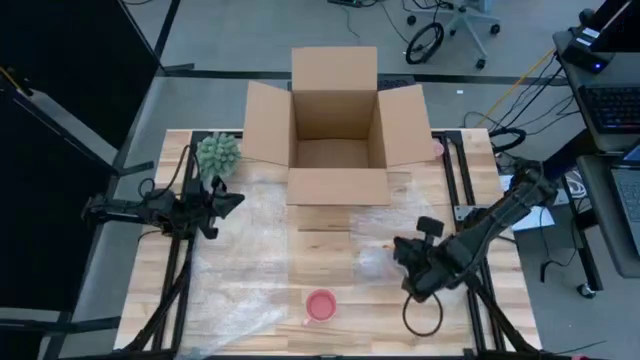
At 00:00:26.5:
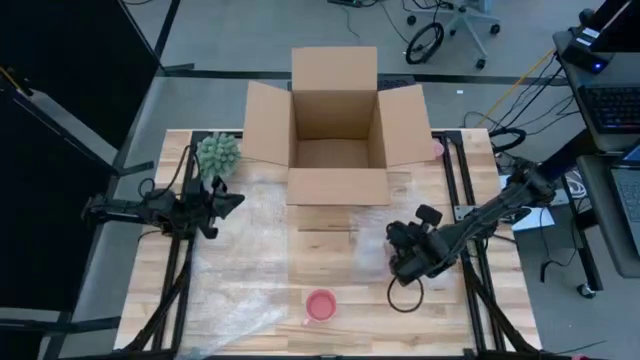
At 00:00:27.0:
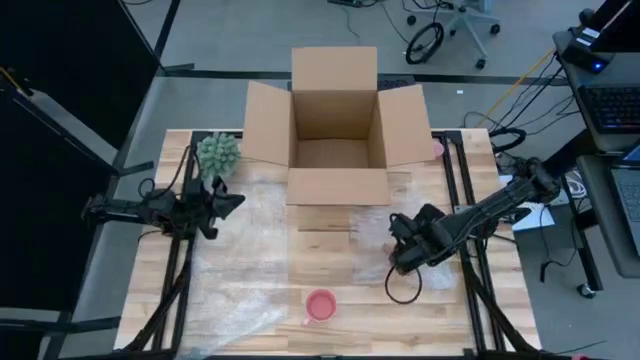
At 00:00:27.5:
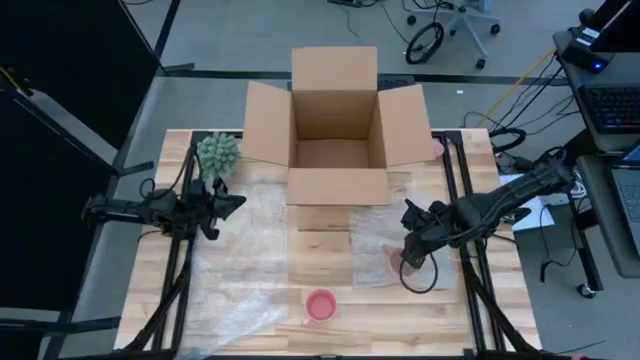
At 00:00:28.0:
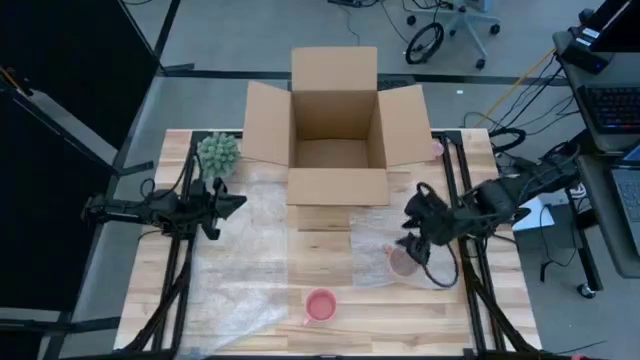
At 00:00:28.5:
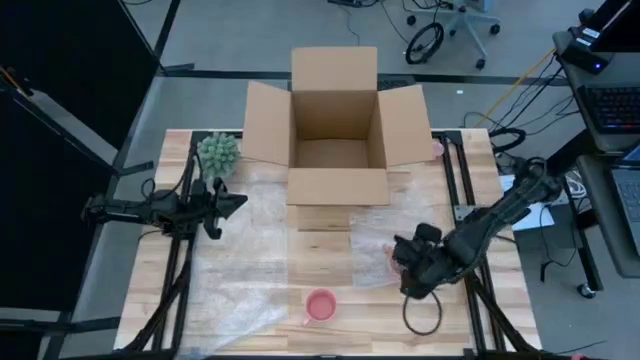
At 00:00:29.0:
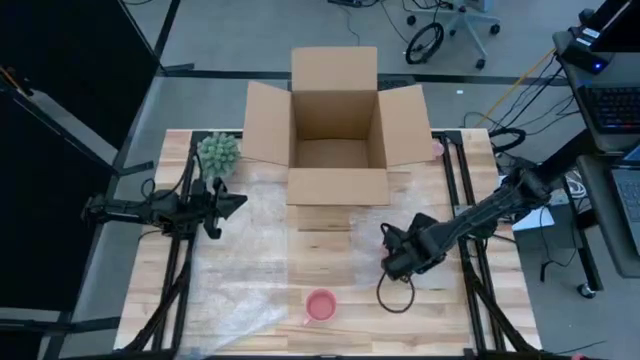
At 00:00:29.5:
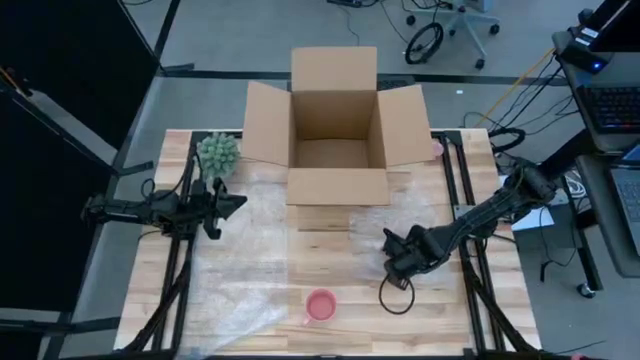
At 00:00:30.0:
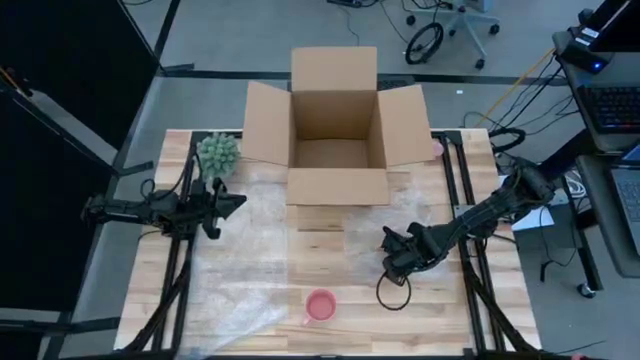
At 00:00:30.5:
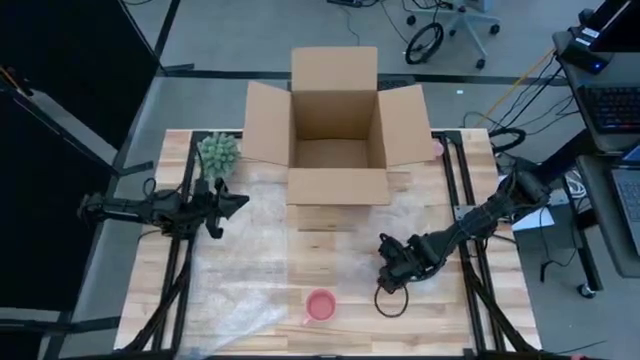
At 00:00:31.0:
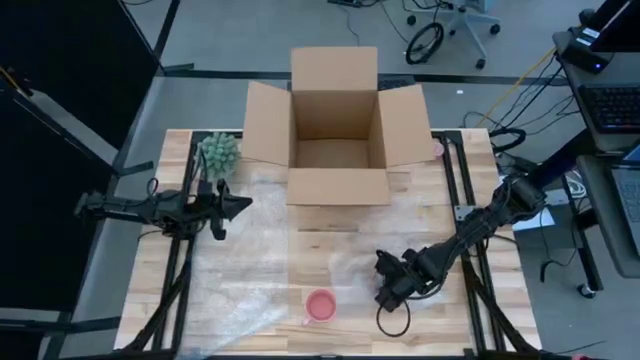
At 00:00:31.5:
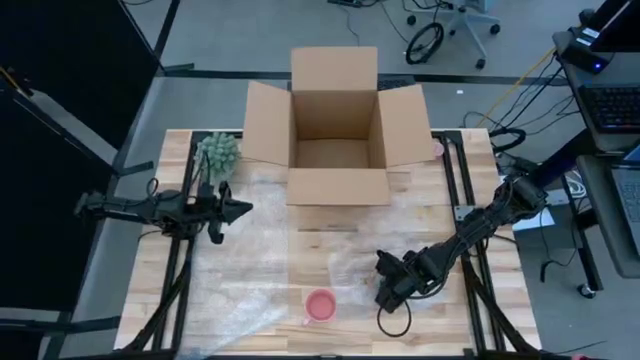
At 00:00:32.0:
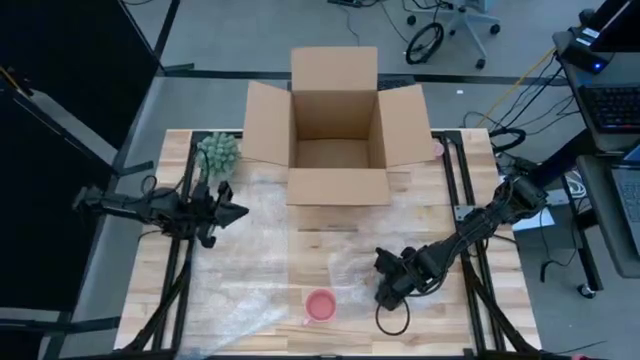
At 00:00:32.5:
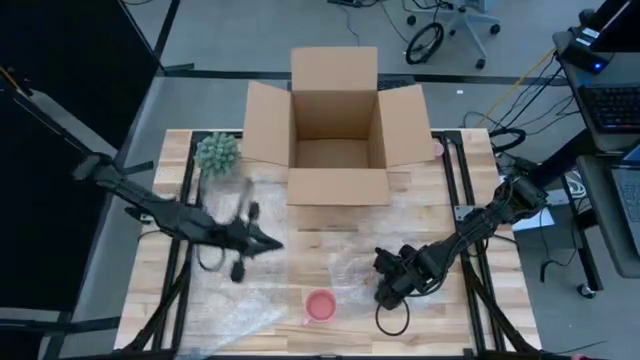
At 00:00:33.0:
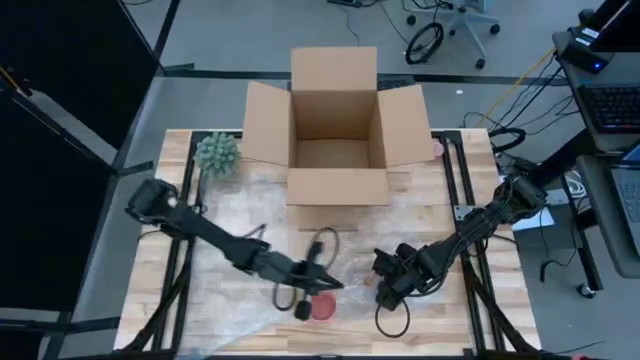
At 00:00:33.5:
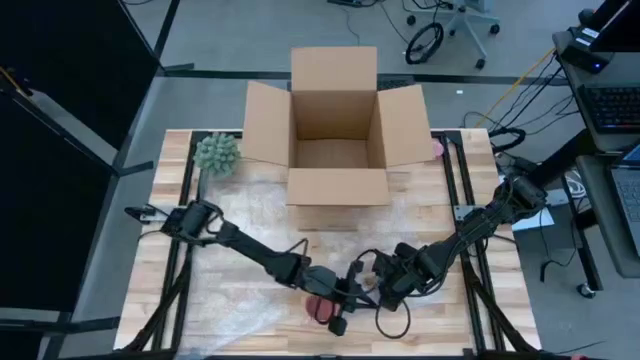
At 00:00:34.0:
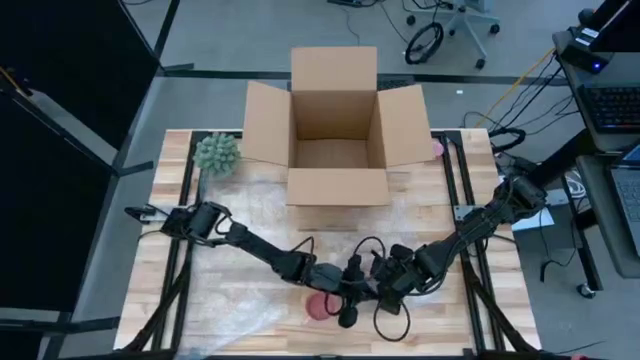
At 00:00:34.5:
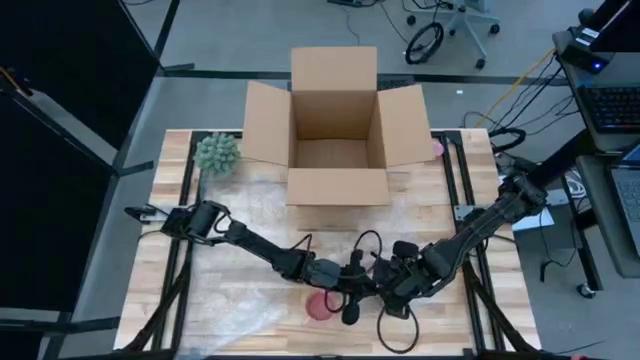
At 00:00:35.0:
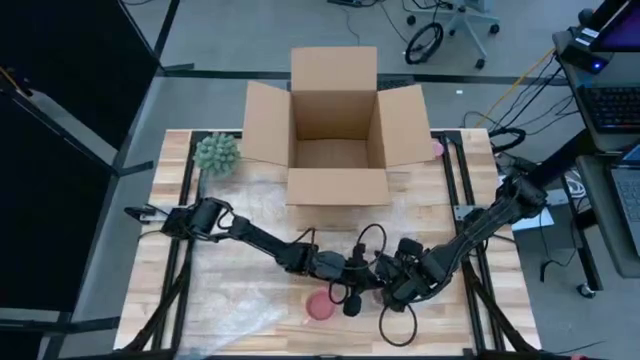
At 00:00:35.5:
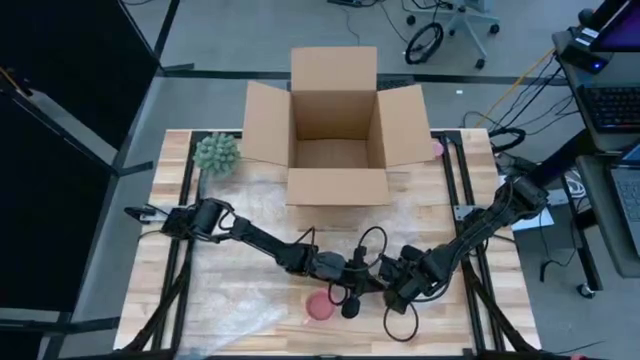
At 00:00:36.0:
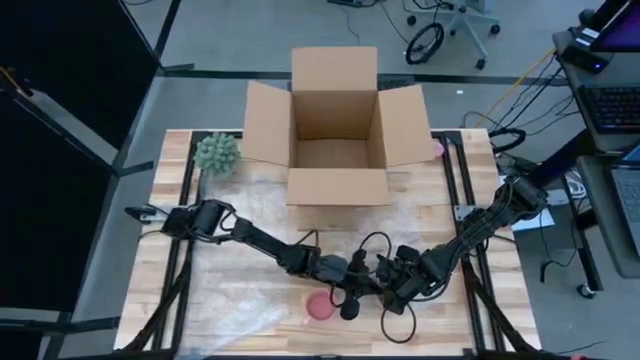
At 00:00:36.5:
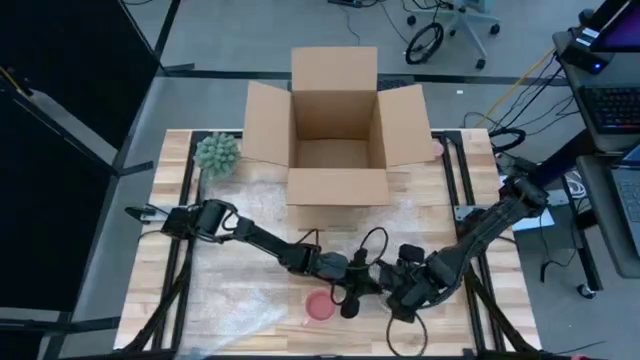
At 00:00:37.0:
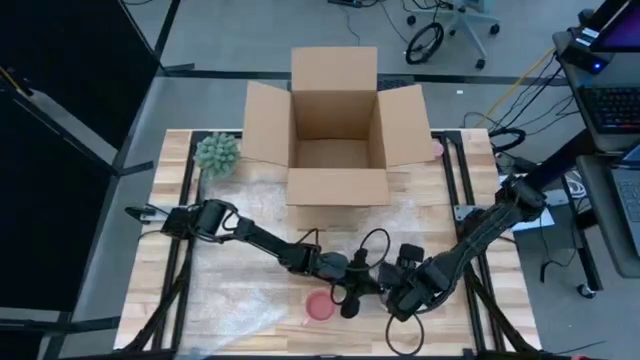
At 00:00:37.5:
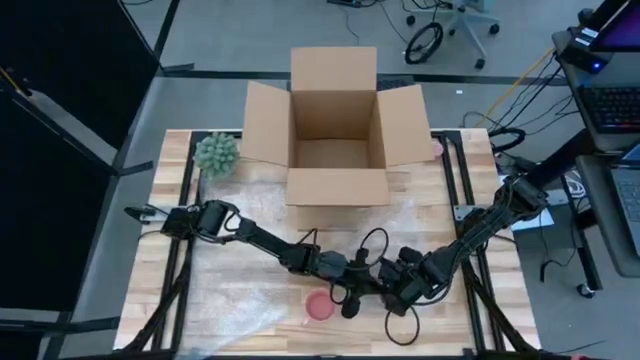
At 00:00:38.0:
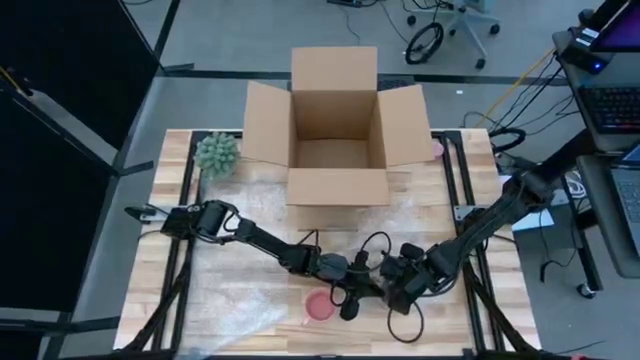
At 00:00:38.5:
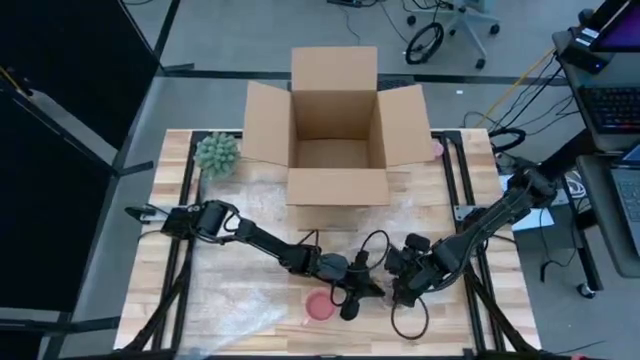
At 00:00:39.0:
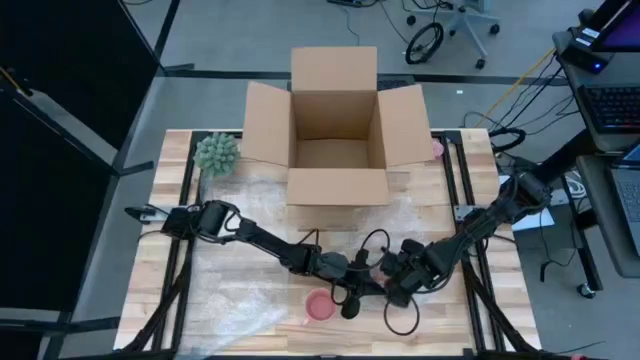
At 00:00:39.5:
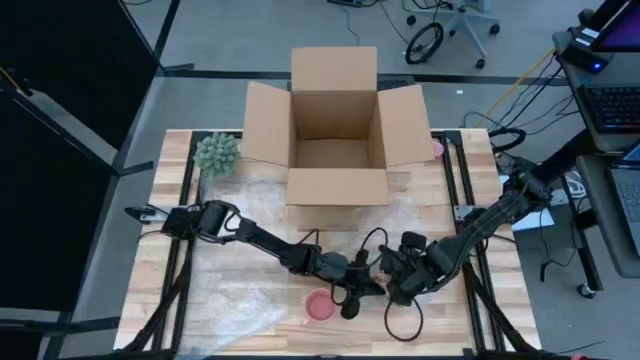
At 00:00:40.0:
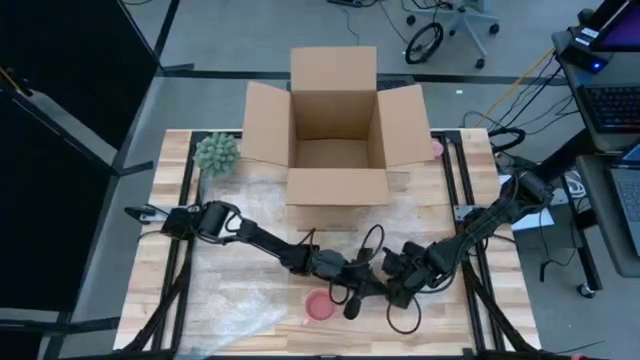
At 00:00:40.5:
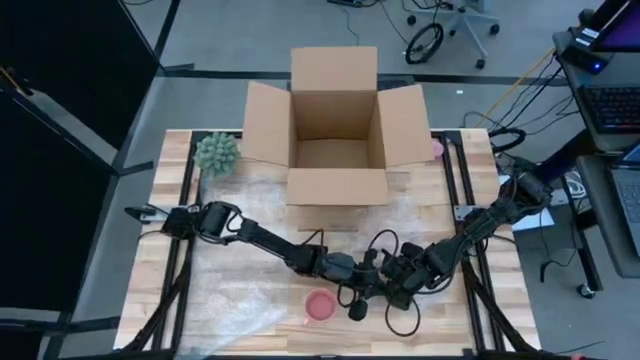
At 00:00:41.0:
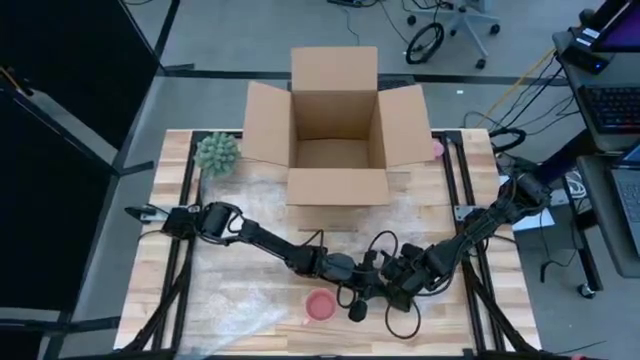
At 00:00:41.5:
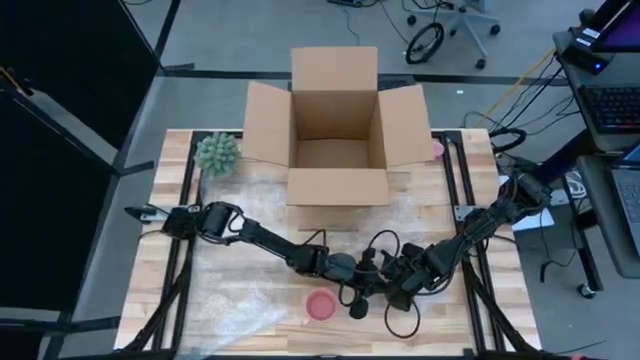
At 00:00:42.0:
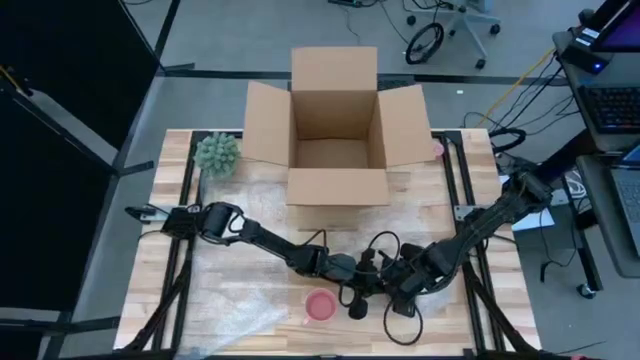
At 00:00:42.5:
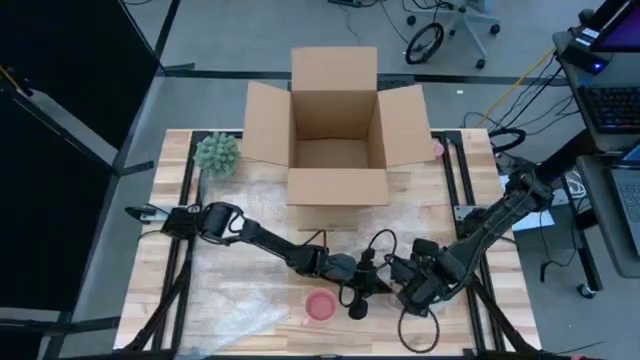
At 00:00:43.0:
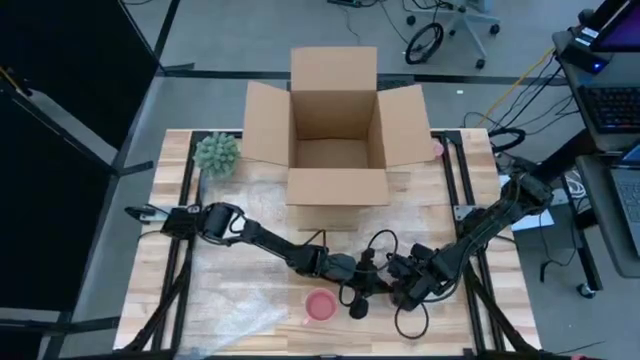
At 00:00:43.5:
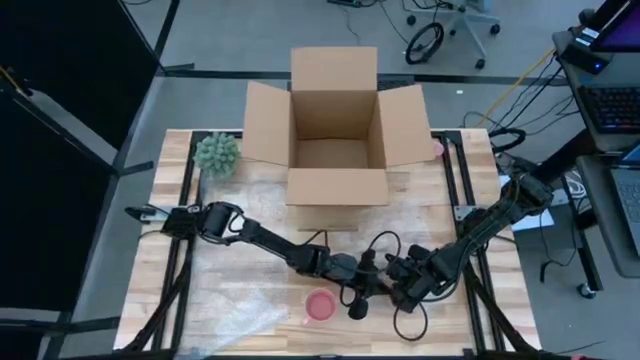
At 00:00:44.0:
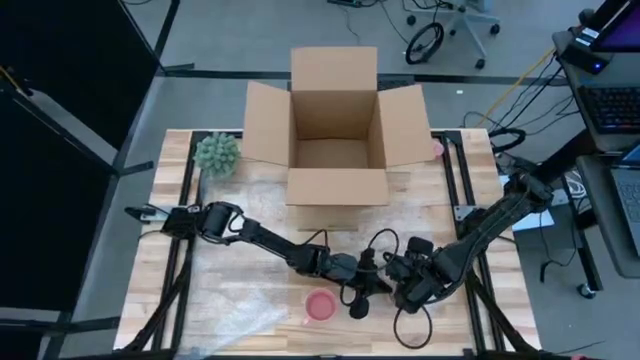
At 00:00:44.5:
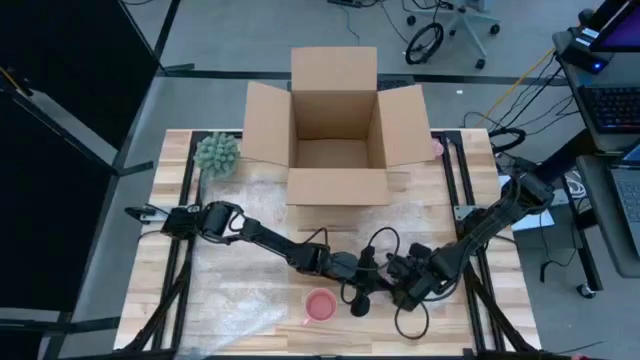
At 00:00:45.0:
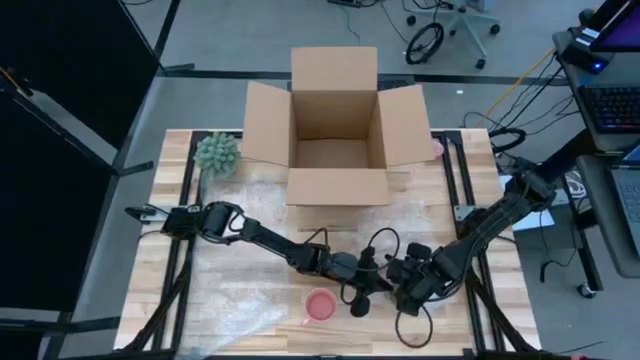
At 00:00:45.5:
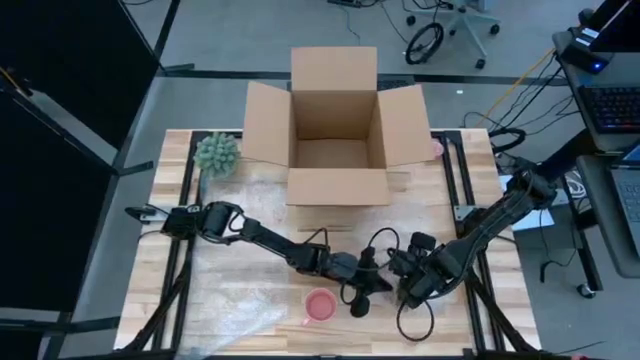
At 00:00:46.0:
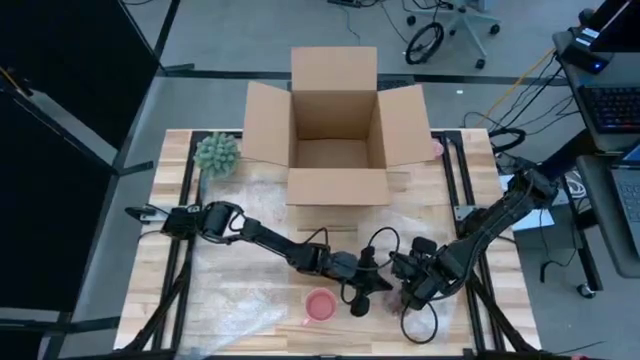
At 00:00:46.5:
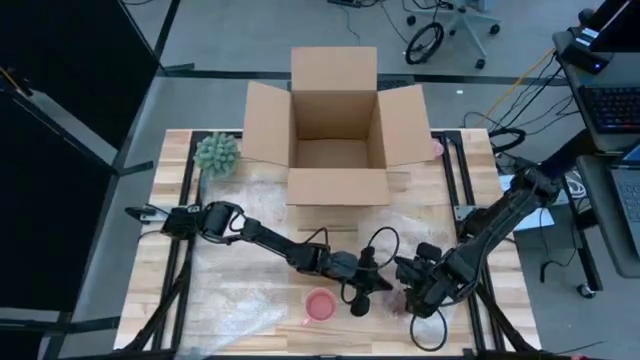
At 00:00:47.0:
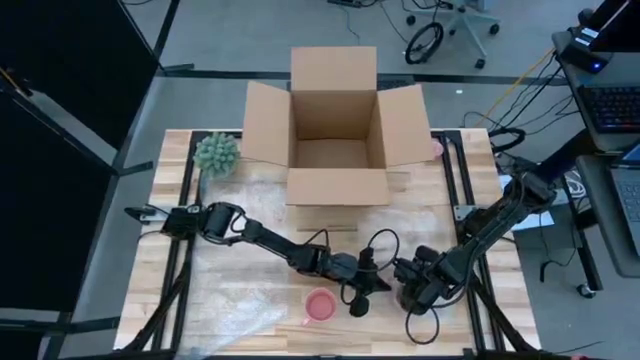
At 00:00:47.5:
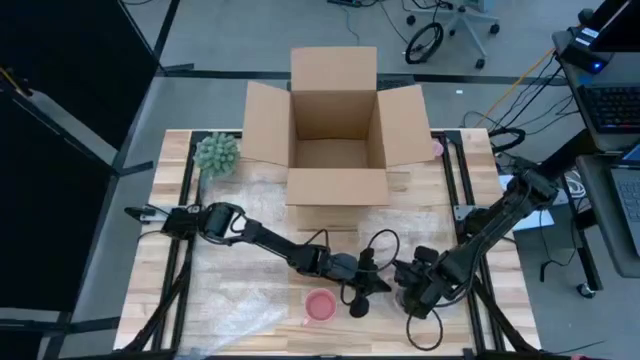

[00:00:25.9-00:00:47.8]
Task: wrap mug
Wrap the yellow mug with bubble wrap
